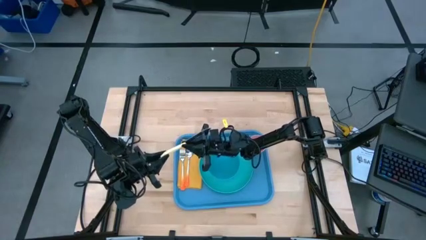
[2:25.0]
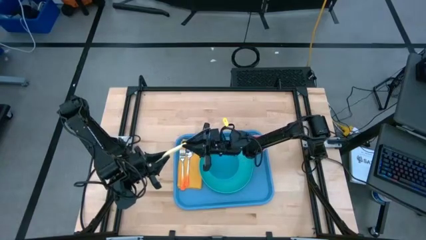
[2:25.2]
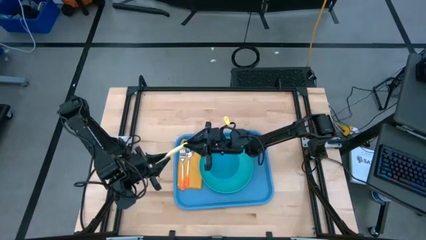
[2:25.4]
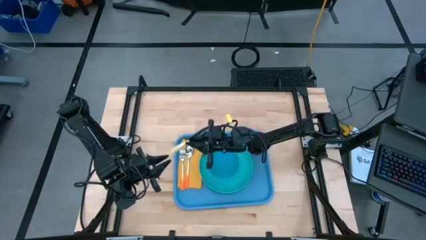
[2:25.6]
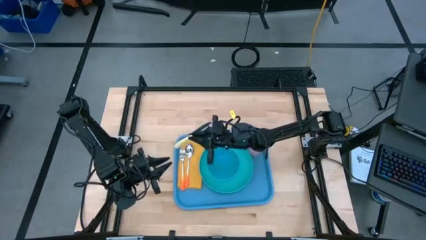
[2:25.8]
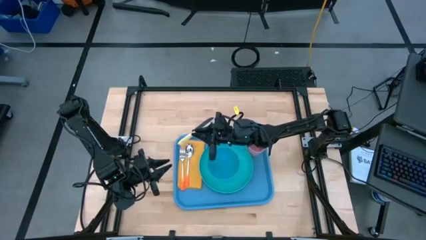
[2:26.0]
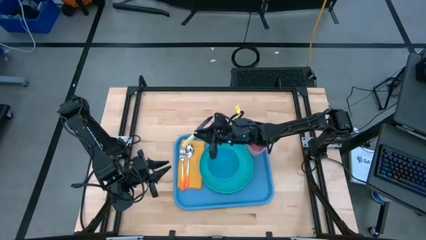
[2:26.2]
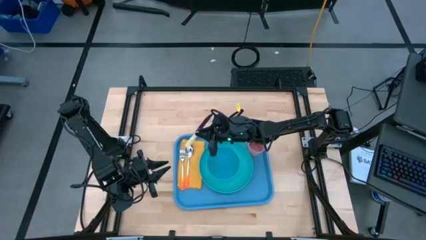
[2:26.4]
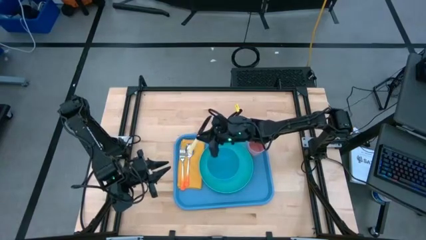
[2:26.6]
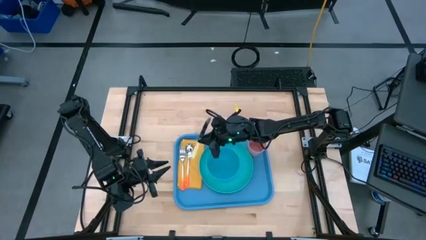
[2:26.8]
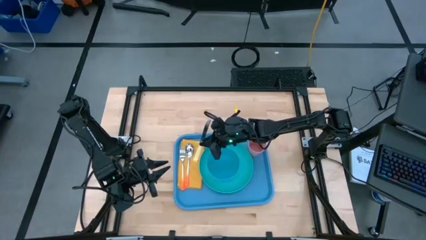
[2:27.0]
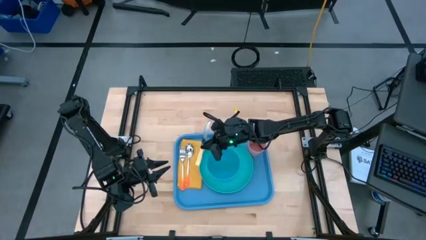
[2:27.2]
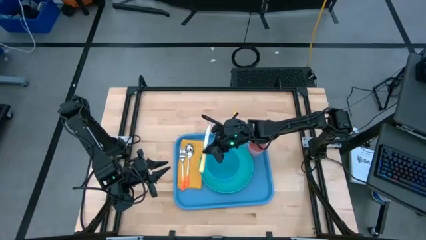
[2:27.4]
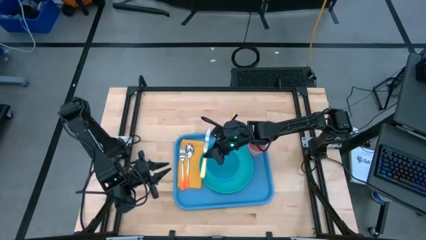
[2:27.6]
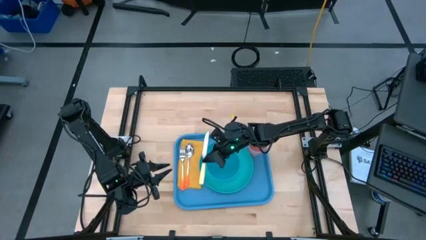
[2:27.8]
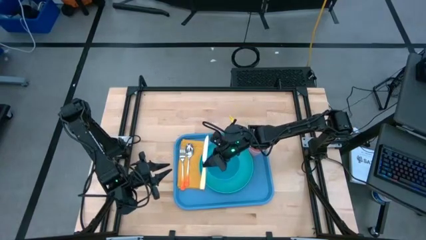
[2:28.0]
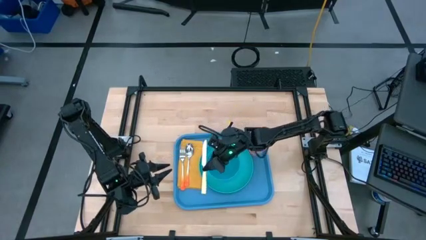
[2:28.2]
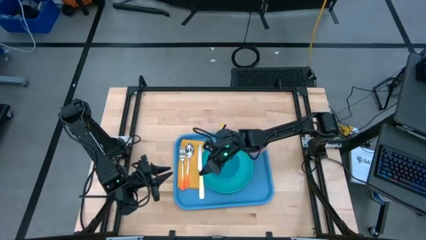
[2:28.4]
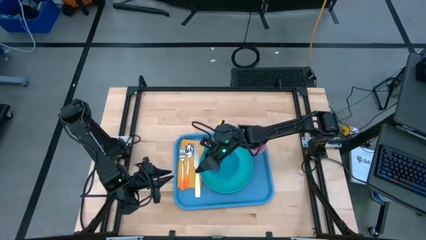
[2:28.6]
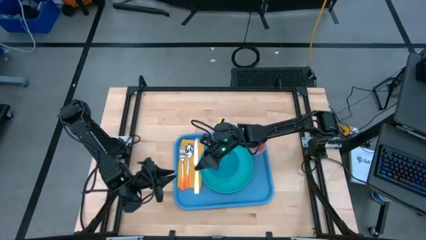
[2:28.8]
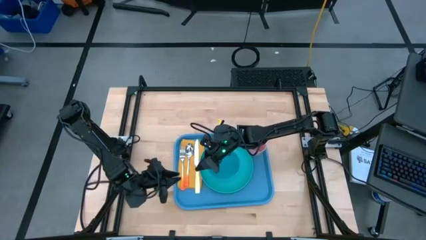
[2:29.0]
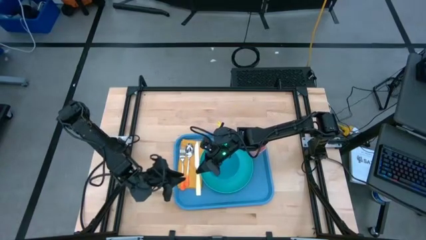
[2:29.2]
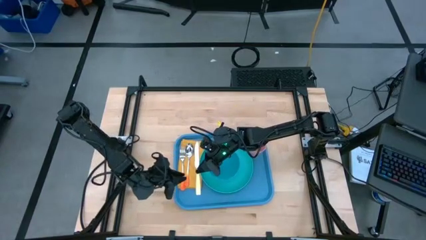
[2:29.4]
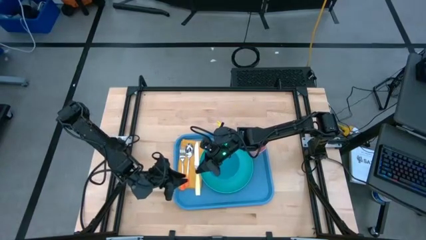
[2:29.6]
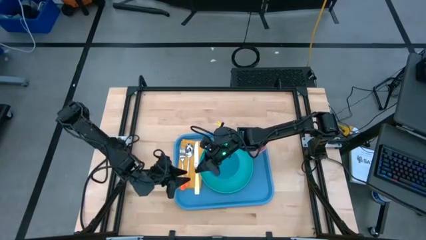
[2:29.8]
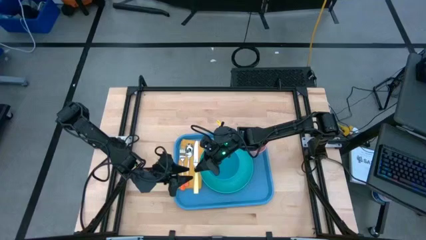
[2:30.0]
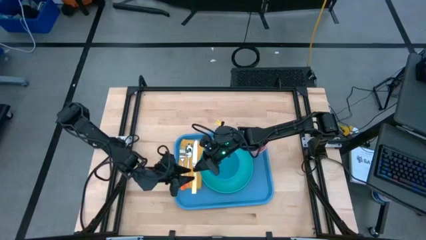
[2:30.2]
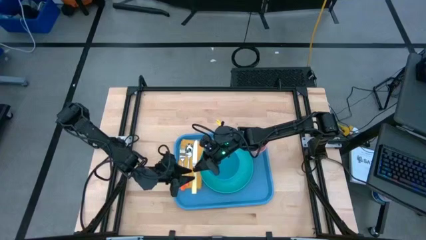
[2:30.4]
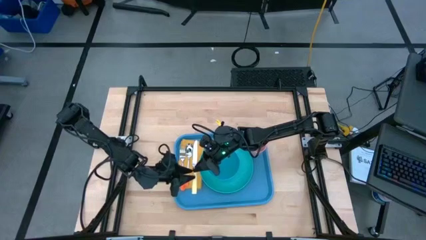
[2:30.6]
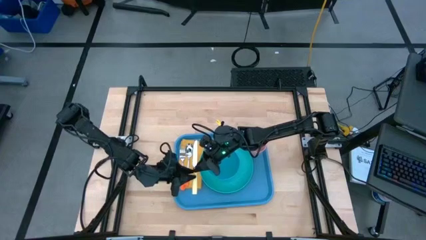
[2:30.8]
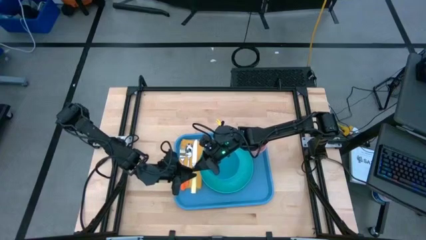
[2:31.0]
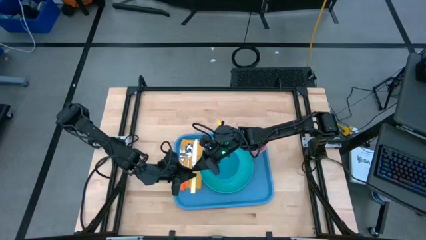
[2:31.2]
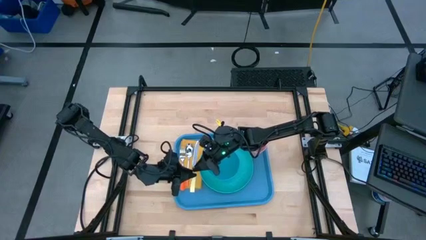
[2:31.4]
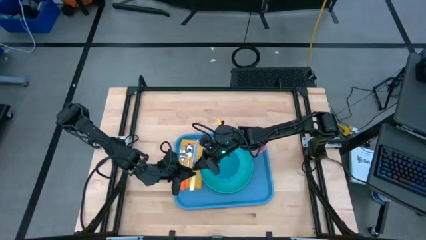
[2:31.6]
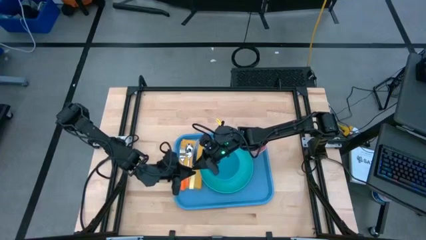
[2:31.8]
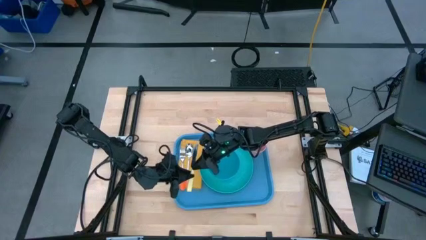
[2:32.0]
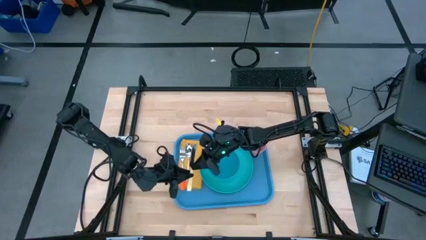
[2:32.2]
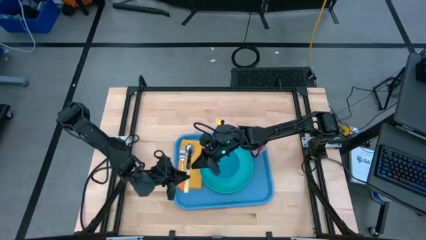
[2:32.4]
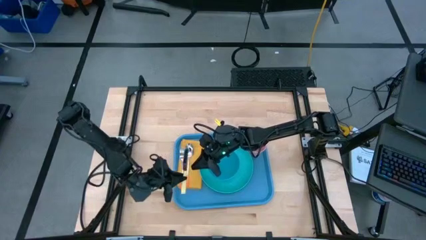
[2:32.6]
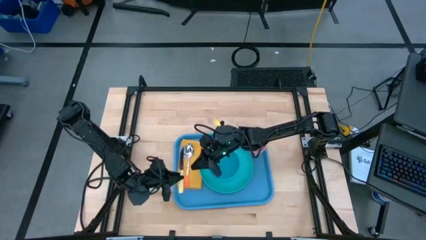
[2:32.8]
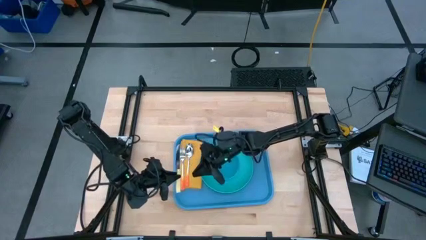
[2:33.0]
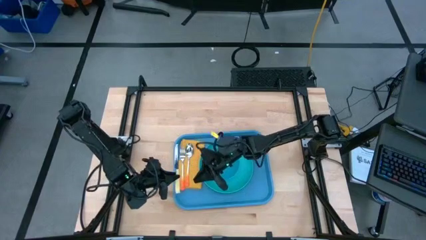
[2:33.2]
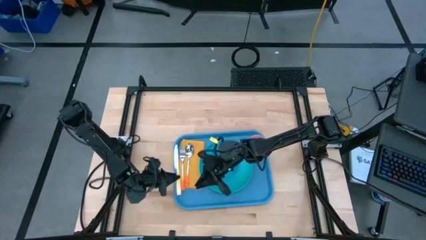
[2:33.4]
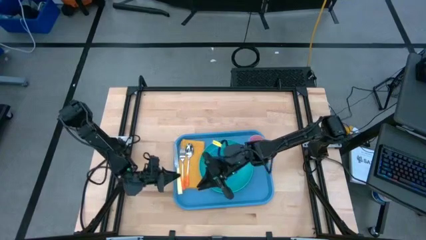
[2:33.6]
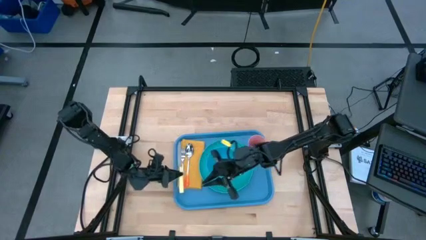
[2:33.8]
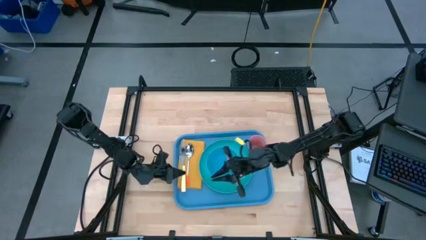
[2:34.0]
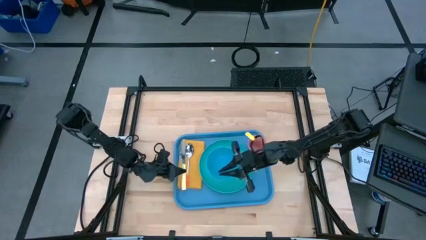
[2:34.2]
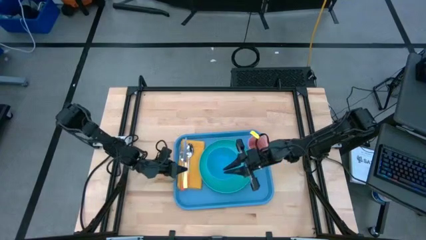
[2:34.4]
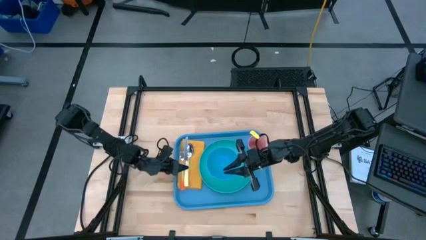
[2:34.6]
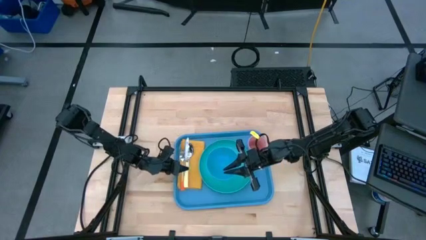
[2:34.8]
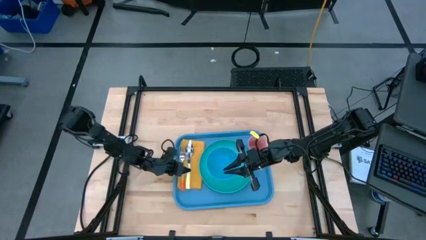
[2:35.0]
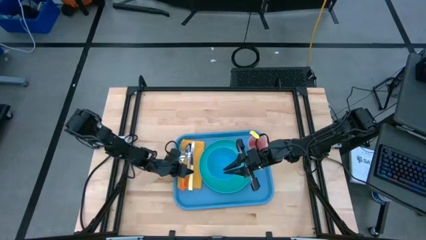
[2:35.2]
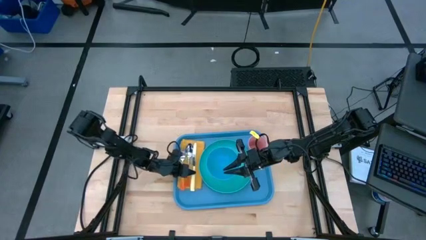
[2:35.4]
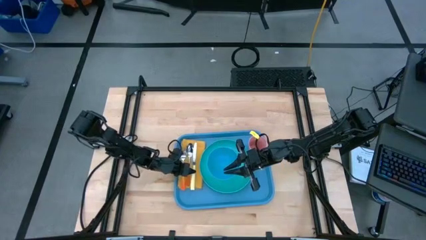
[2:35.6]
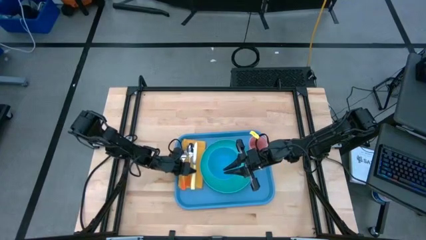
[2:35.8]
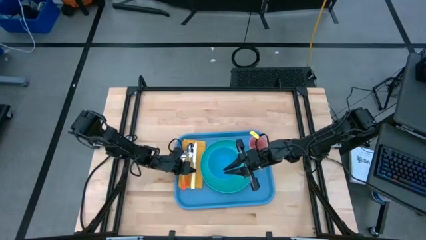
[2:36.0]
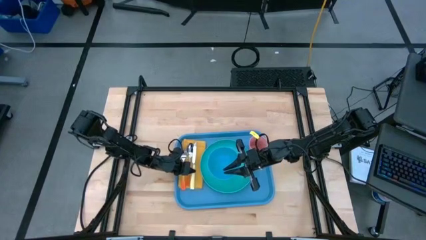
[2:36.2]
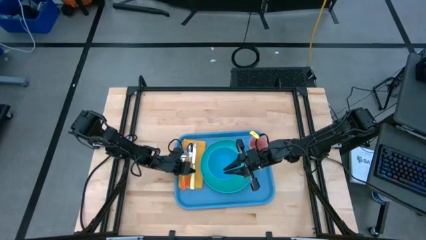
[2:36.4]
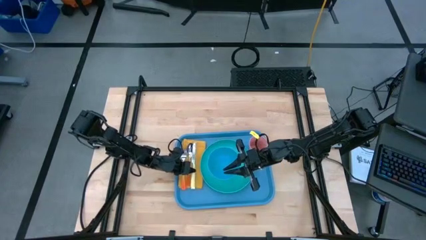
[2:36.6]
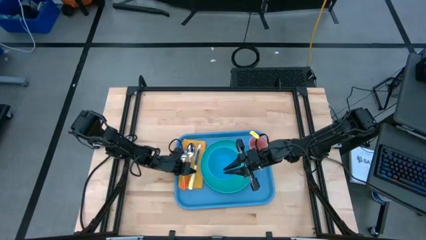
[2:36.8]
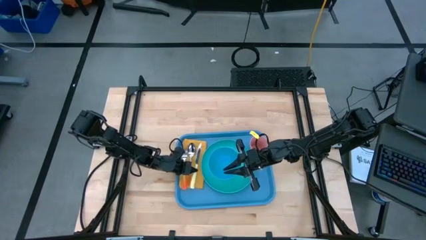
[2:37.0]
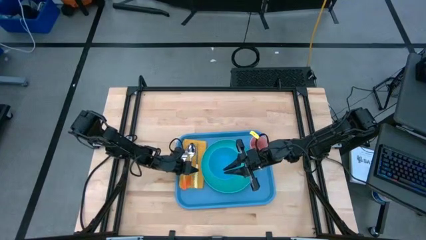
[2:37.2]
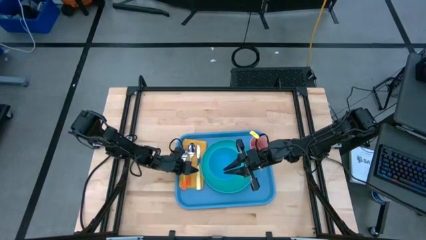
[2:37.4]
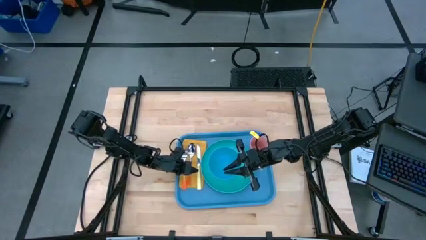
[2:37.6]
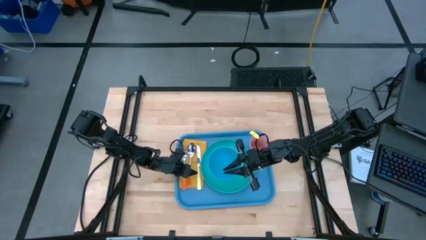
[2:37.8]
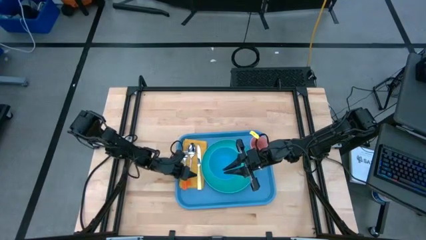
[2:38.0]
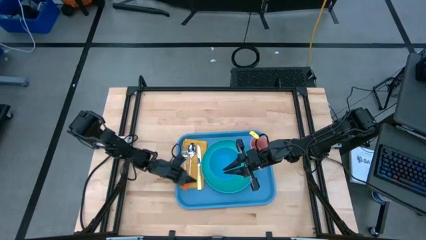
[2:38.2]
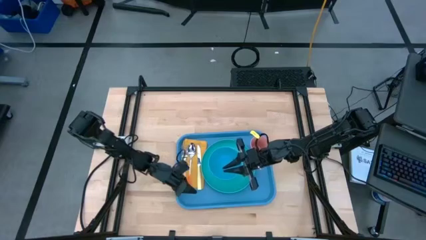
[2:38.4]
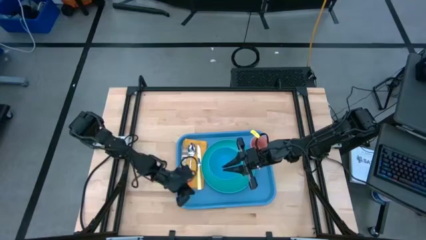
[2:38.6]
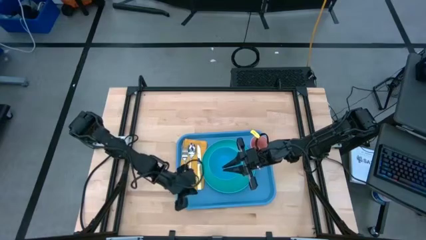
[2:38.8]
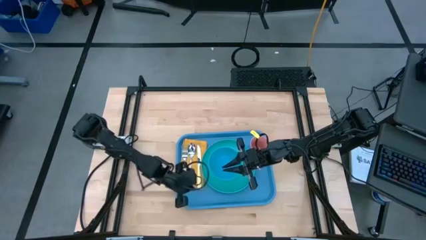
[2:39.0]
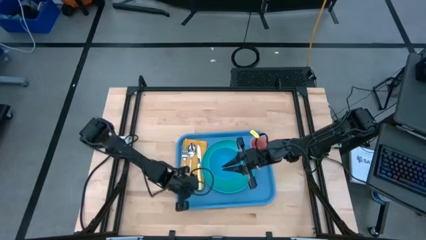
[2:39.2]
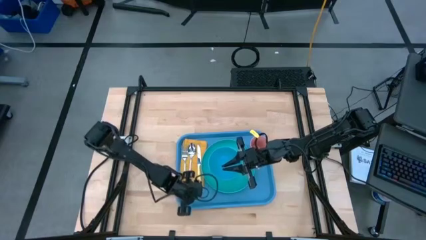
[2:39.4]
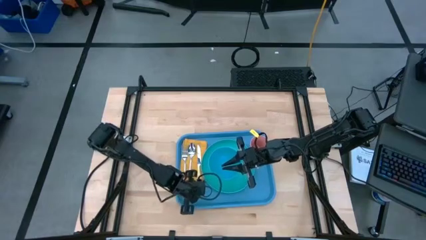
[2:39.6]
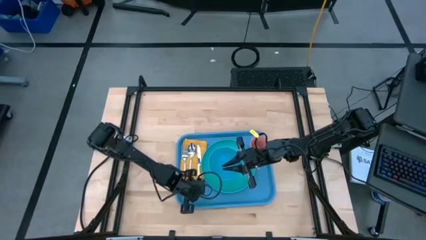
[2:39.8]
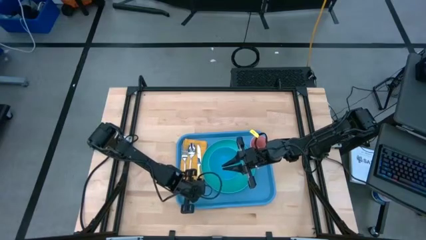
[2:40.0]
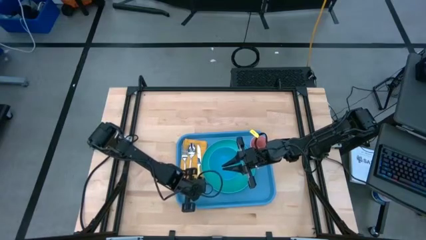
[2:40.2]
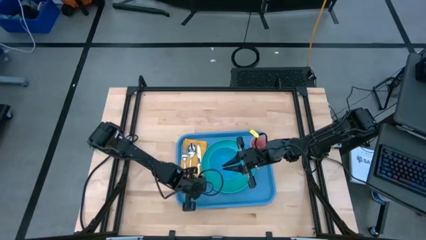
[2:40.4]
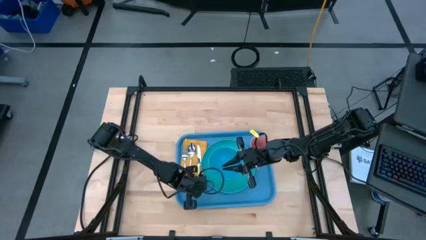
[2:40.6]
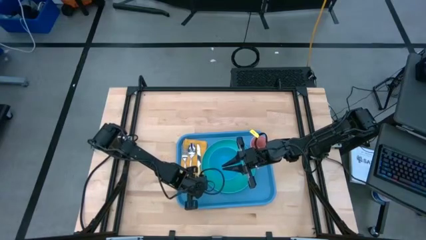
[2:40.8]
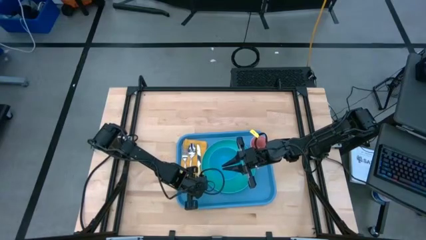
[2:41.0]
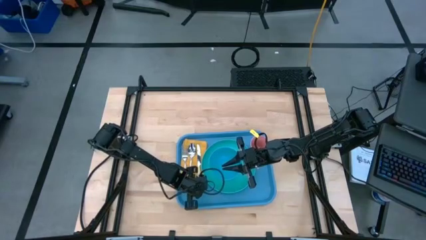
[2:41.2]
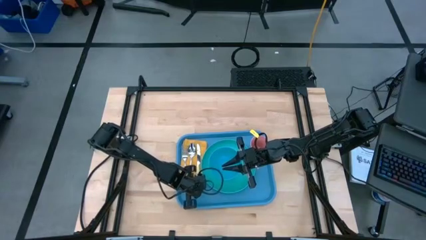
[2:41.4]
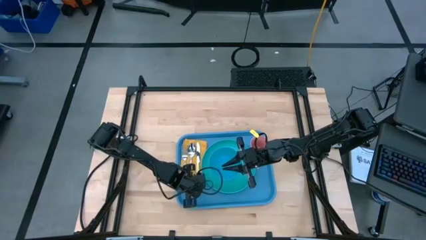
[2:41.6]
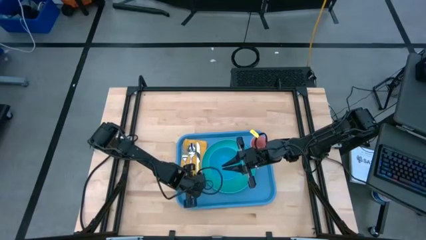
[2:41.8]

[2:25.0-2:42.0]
Task: Set up tray
Put the yellow knife to the right of the orange spoon on the yellow napkin
